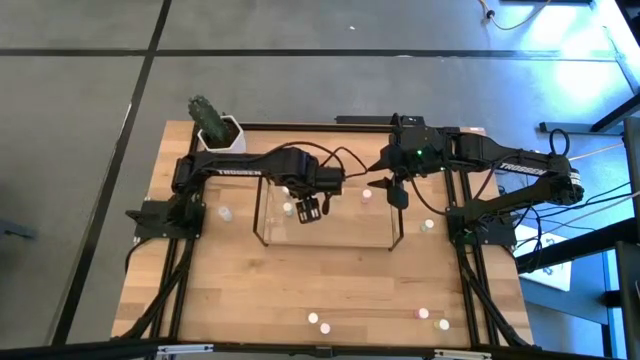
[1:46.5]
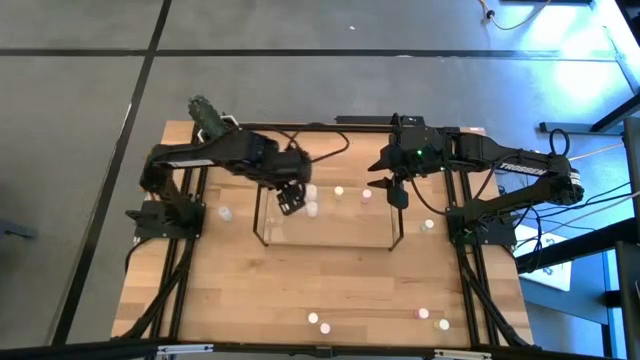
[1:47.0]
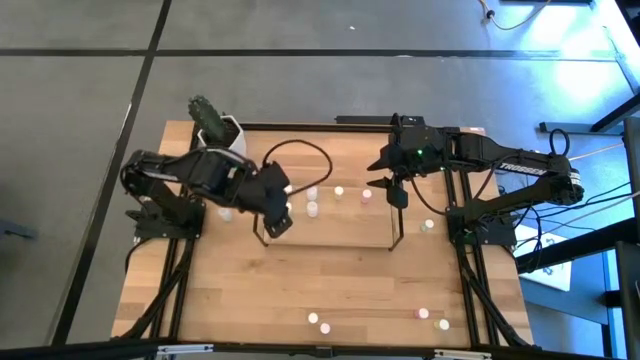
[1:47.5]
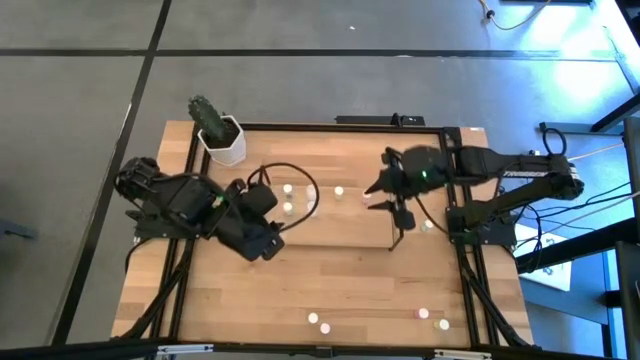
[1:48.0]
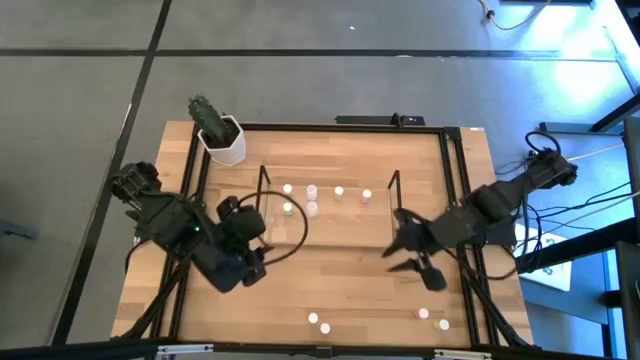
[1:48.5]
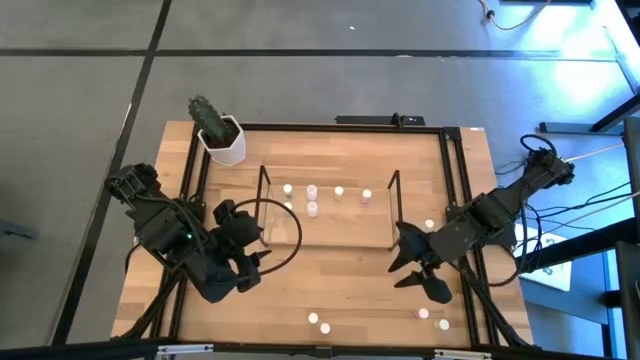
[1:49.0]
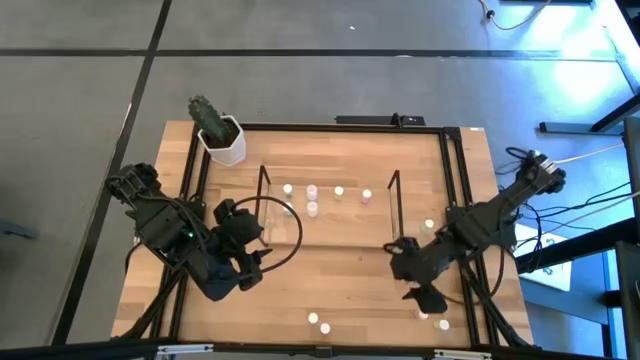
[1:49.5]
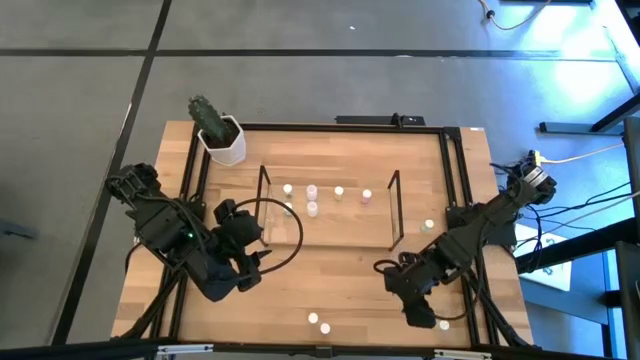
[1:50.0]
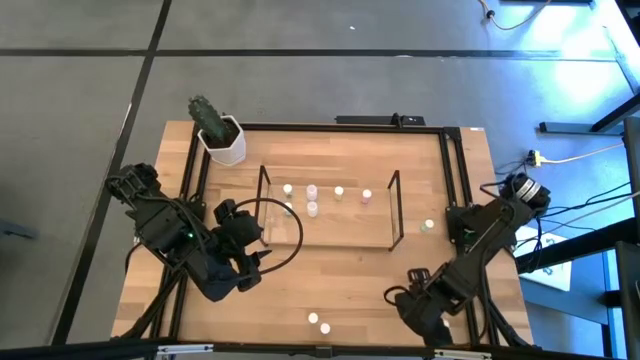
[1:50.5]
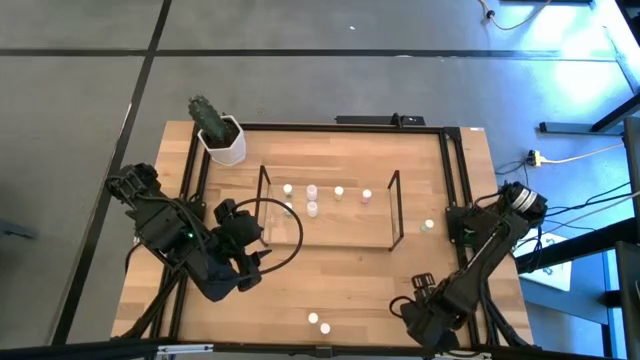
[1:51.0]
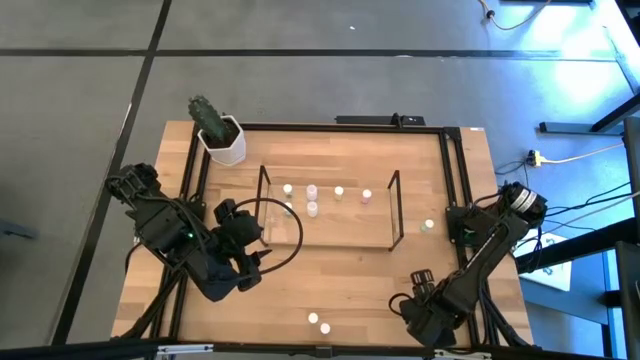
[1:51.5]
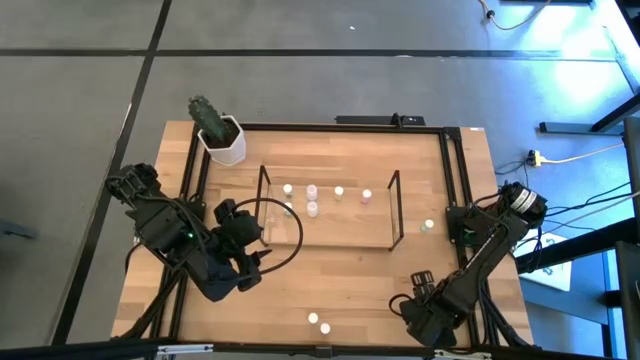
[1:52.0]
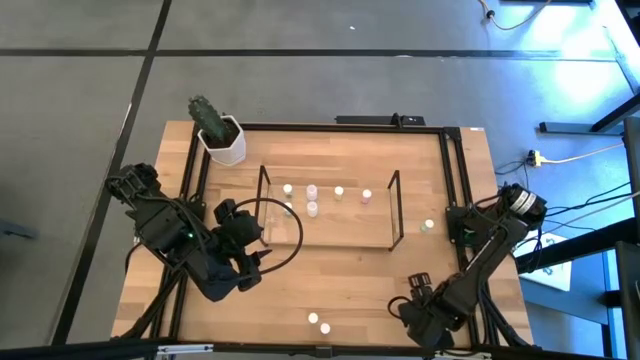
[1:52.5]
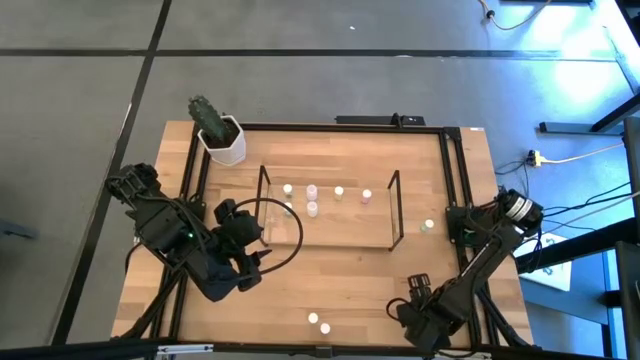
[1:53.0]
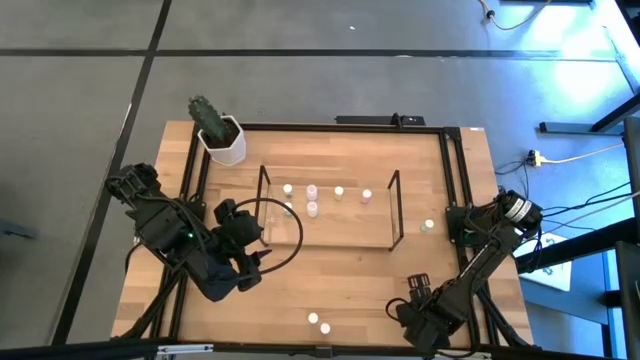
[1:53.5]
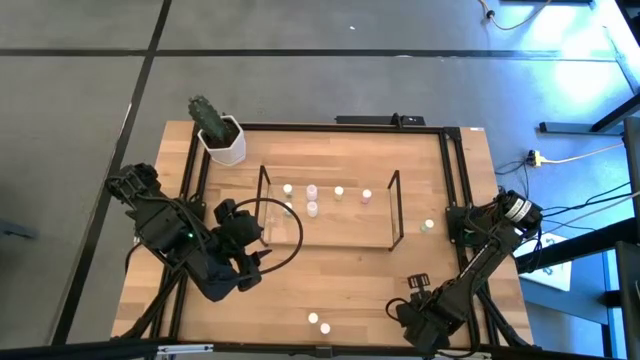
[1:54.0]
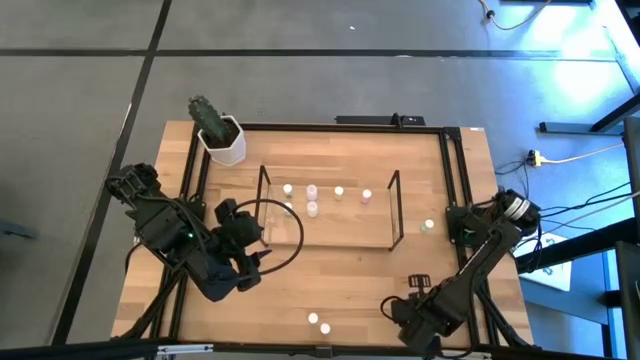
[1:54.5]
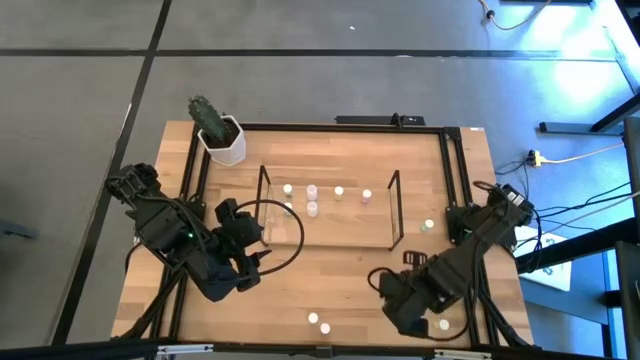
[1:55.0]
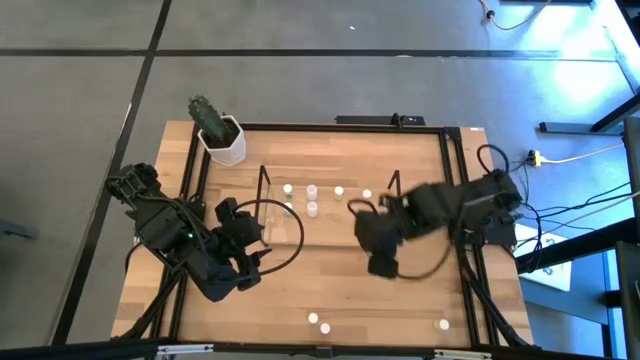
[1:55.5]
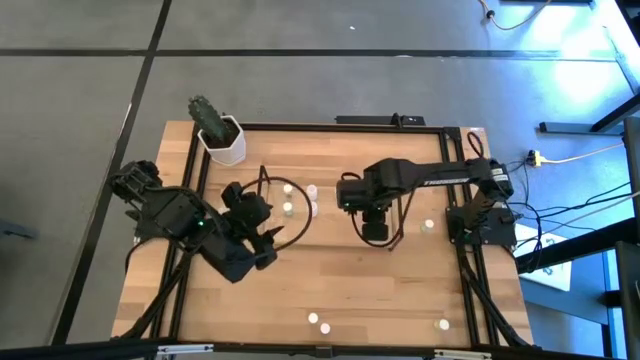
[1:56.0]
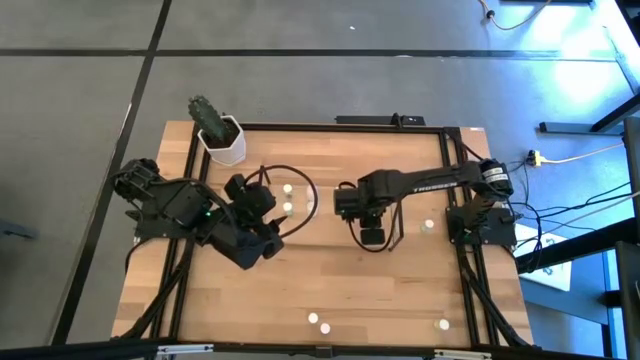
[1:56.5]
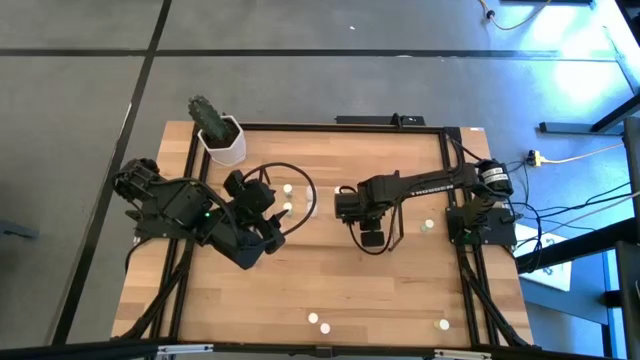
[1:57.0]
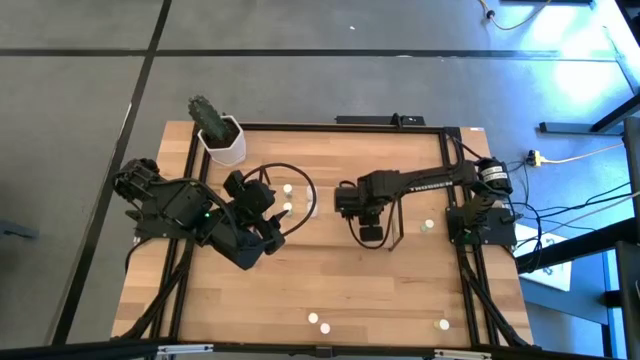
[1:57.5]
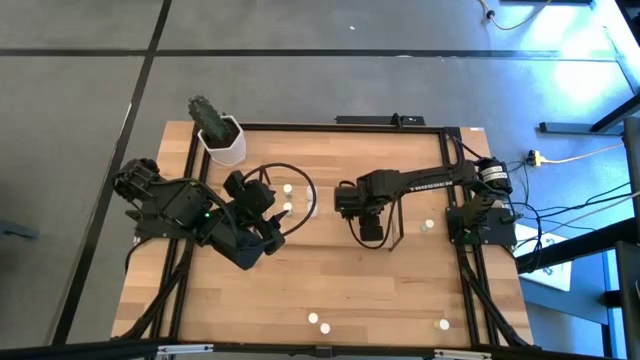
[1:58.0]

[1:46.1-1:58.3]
Task: Pick and place medicine bottles onto shelf by color
Put the right pink pill bottle aligned with the other pink pill bottle on the shelf

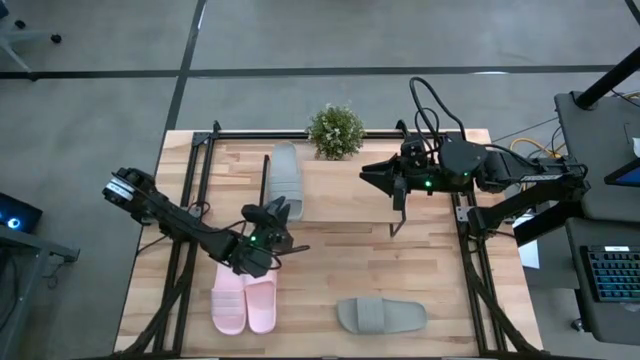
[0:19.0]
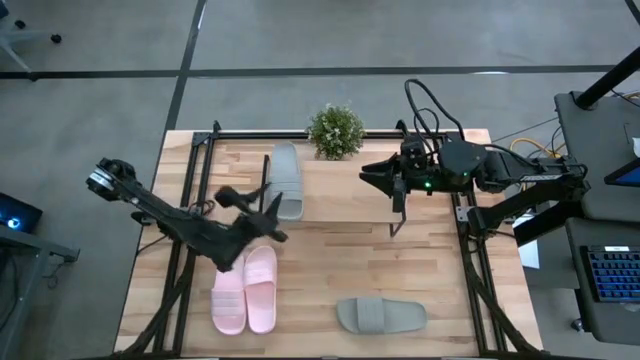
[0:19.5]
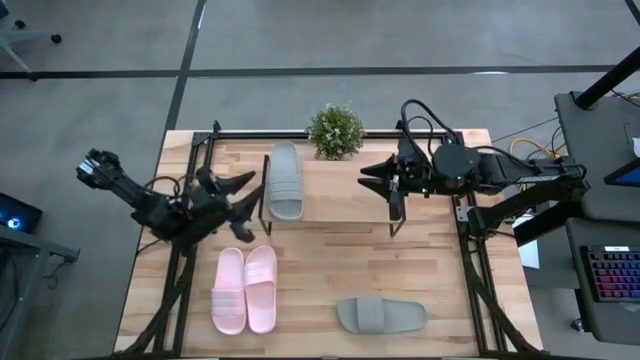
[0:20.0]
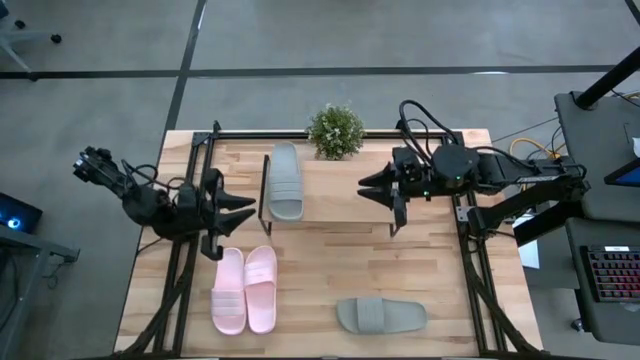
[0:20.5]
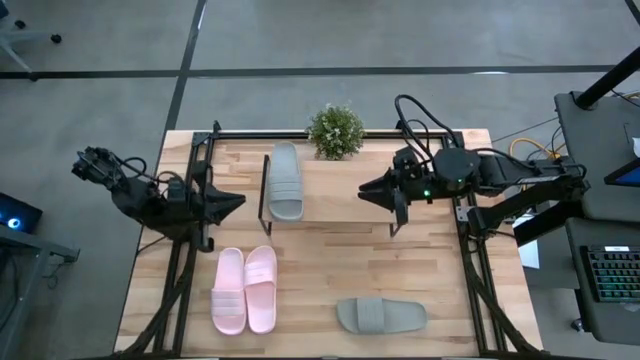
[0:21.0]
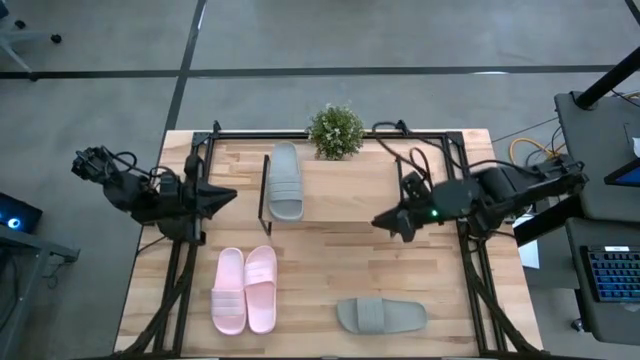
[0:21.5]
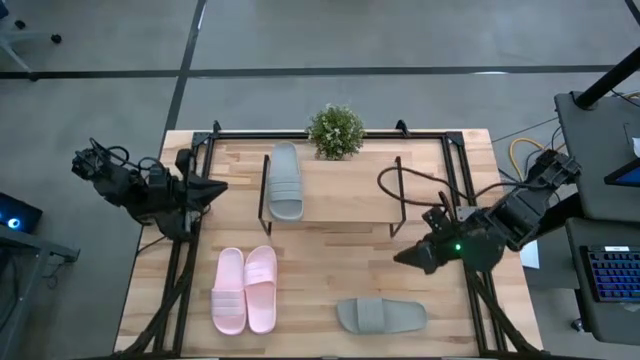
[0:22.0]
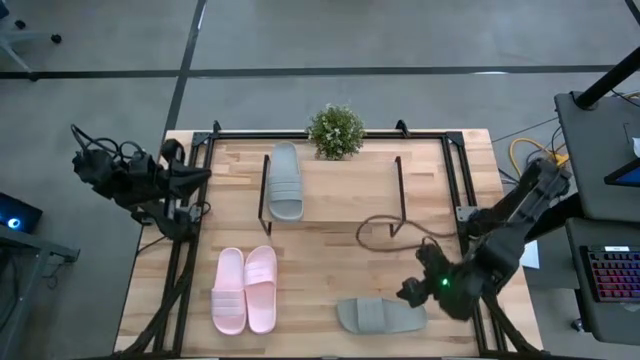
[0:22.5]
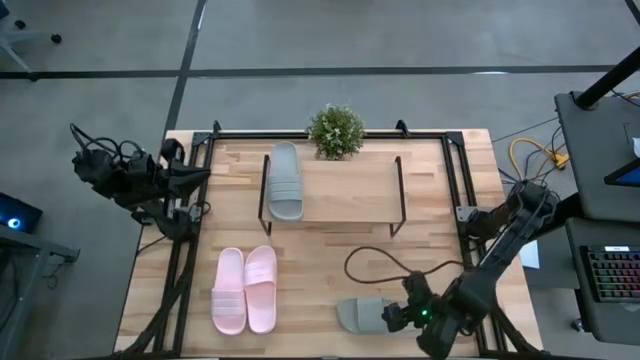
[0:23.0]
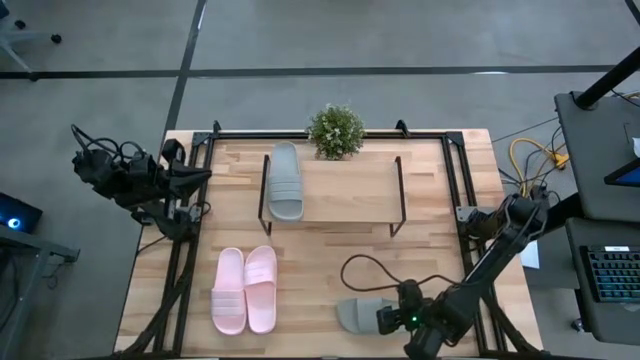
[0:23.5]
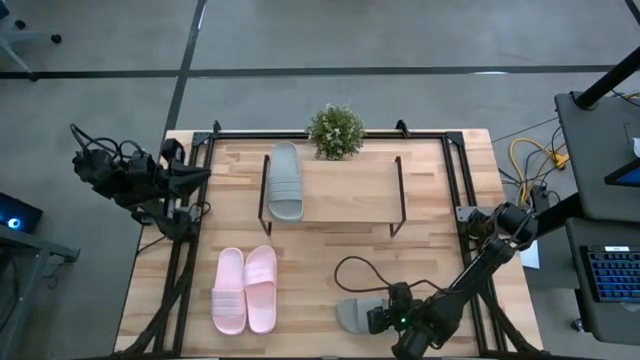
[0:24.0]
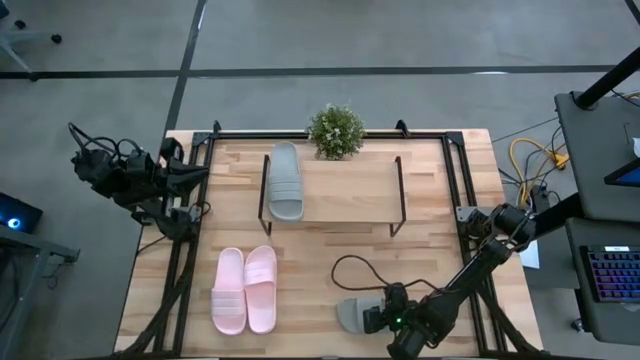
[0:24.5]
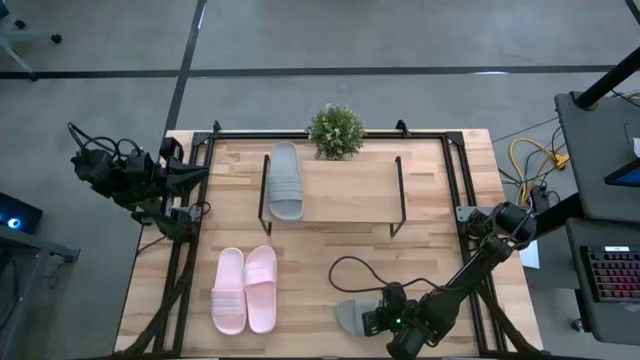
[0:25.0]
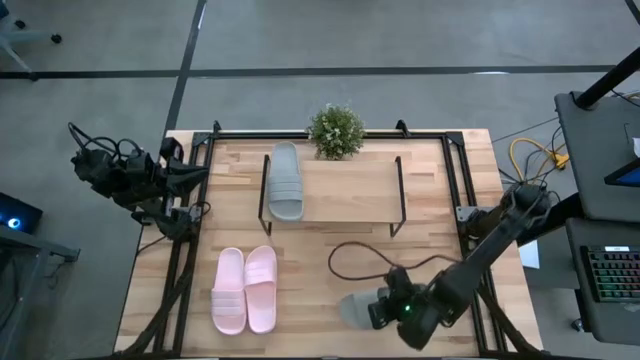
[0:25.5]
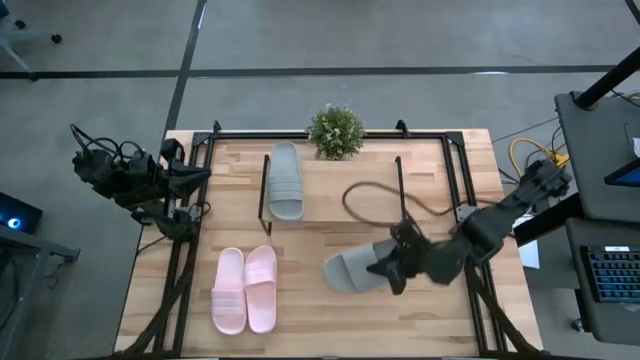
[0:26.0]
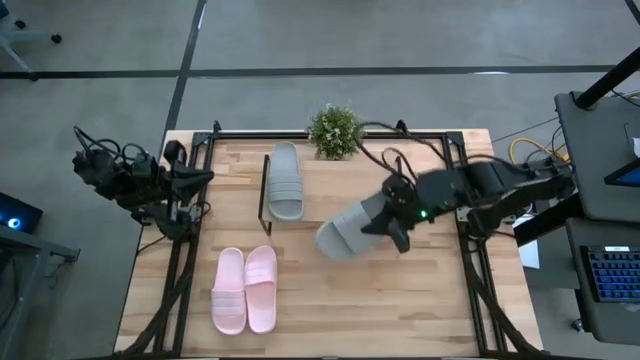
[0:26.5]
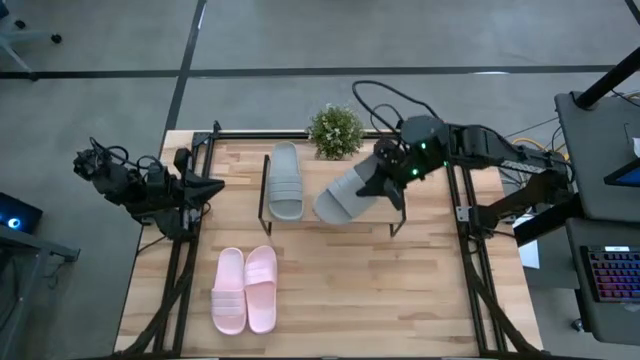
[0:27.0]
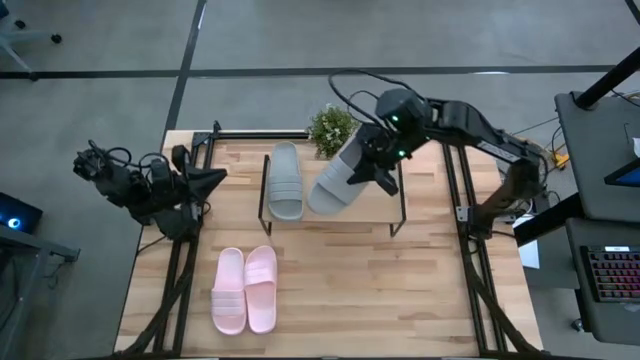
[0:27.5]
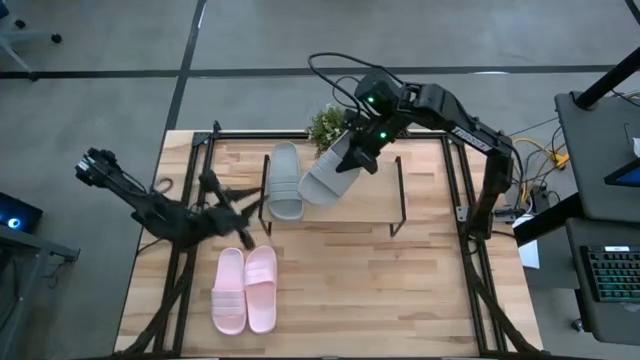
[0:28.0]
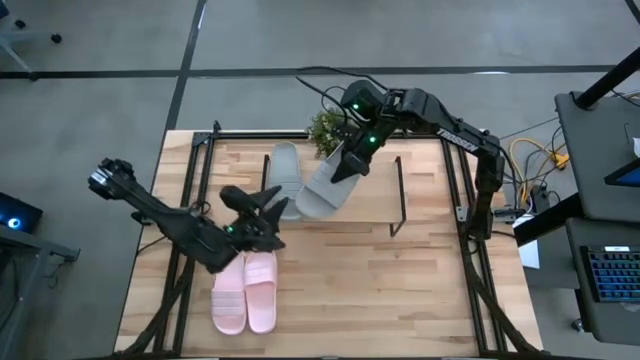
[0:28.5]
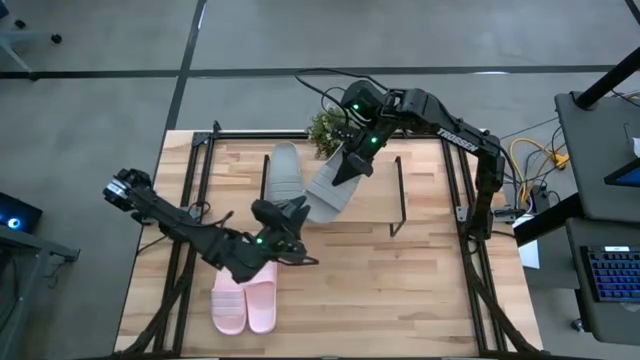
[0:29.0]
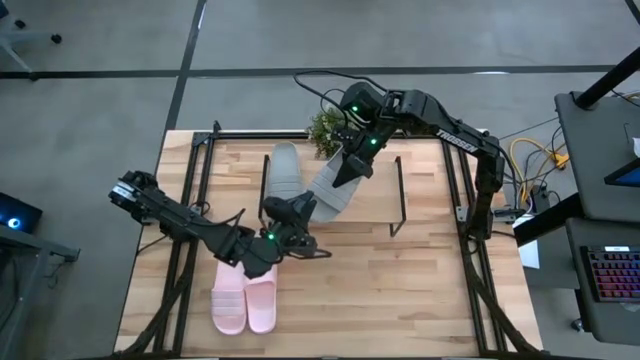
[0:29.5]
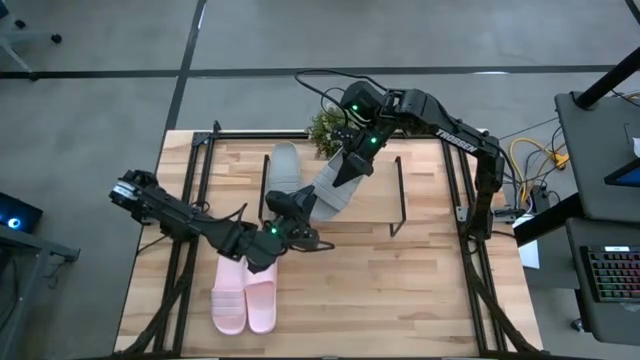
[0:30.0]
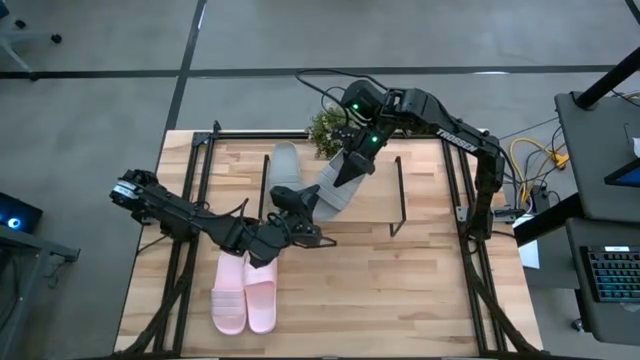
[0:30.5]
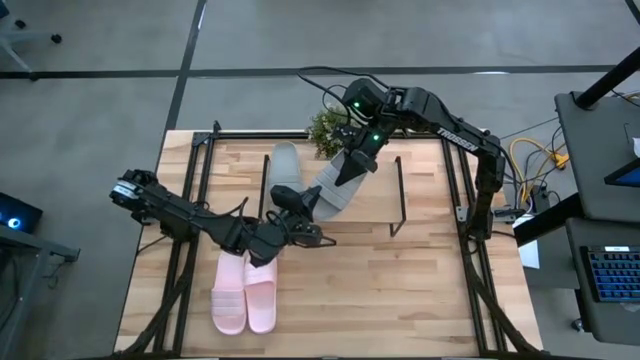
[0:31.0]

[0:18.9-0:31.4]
Task: Pick and place slides into the shelf
Put the left gray slipper on the shelf
